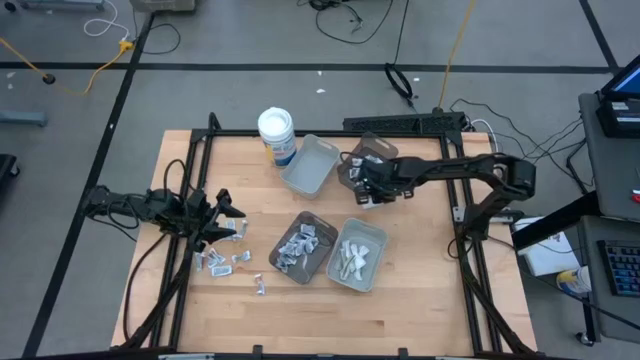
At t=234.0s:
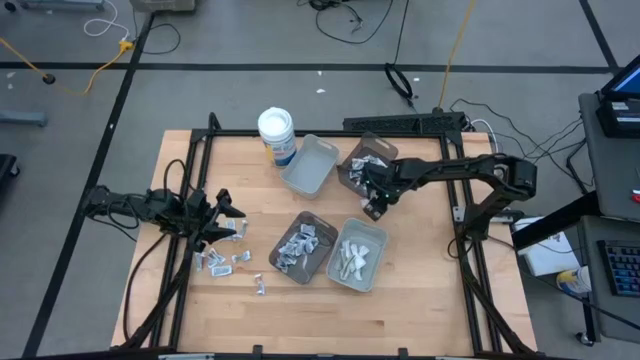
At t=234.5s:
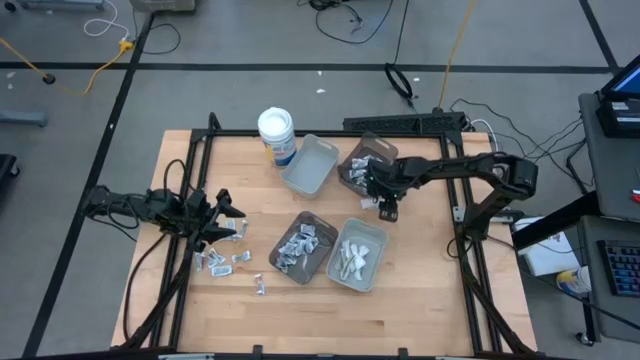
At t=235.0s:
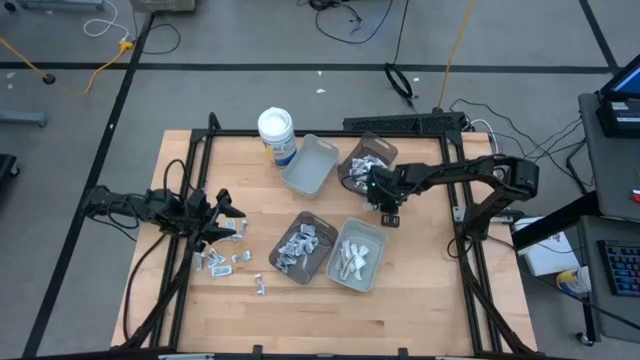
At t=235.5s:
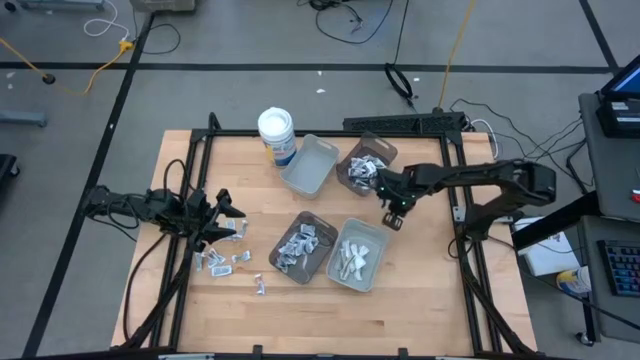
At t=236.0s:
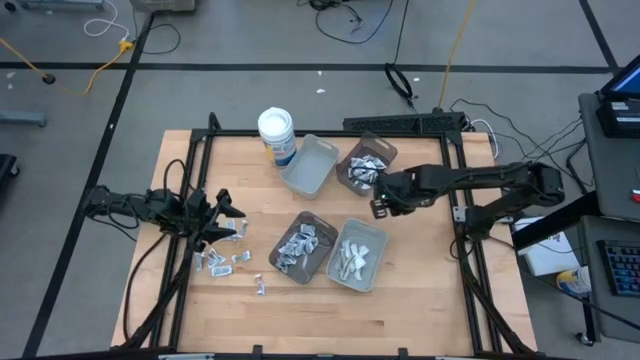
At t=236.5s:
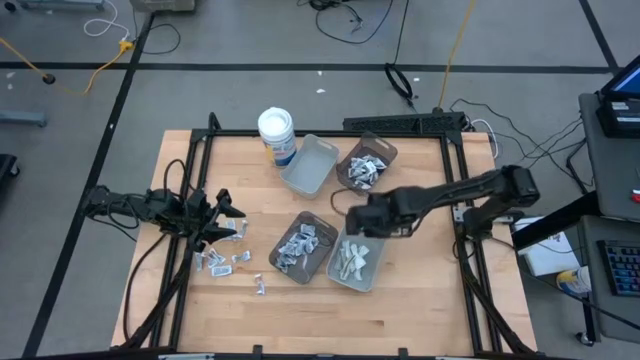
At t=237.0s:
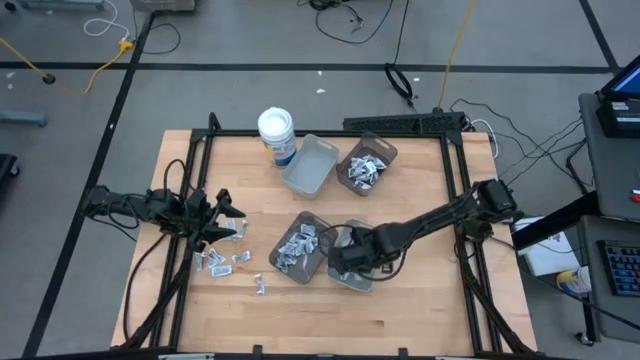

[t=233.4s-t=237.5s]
Task: Pick & Place First Aid Supplies
Put the green bandage into the bottom gray bin

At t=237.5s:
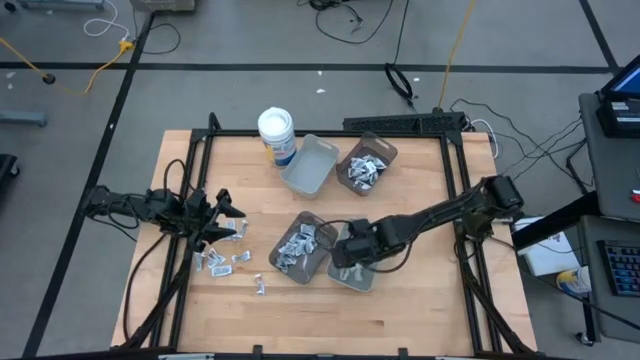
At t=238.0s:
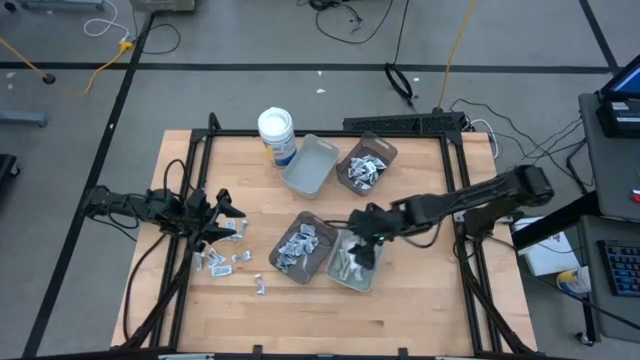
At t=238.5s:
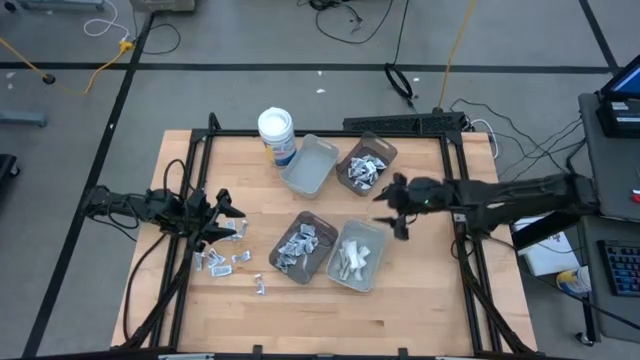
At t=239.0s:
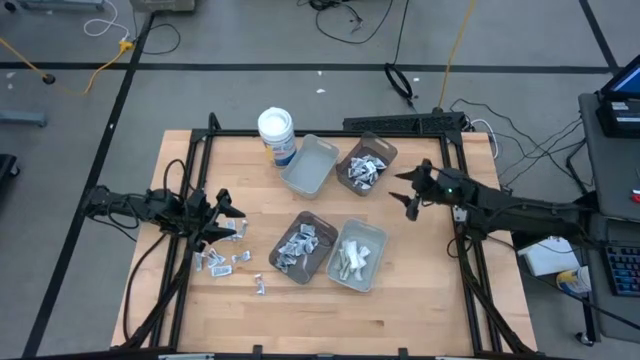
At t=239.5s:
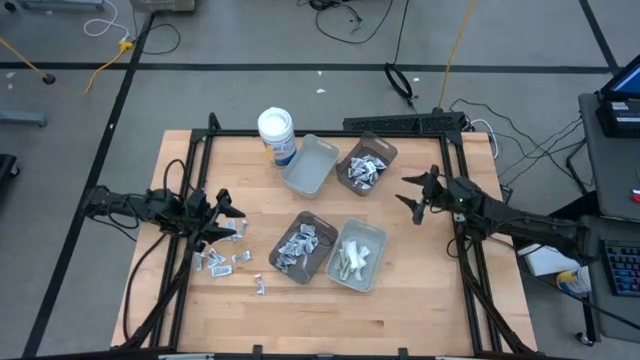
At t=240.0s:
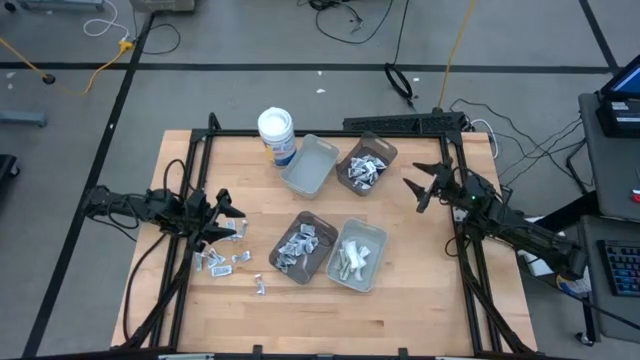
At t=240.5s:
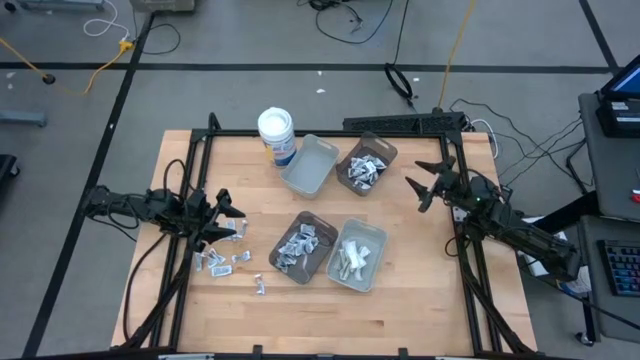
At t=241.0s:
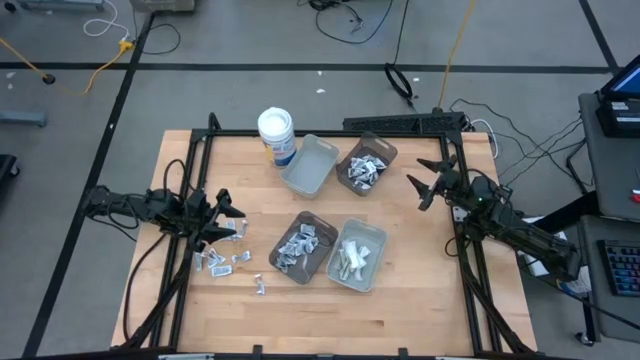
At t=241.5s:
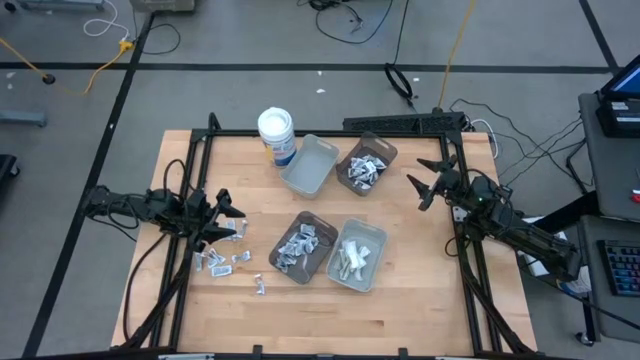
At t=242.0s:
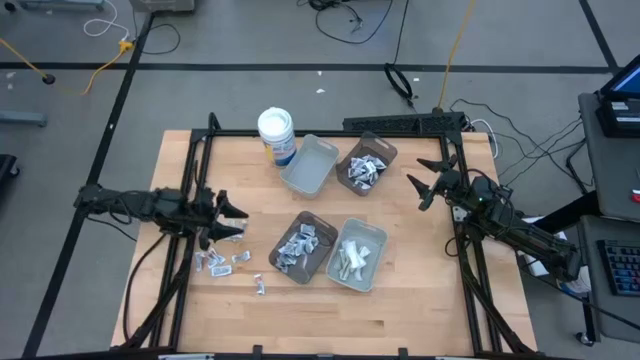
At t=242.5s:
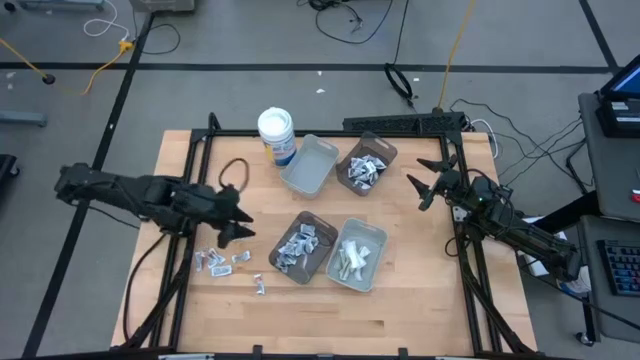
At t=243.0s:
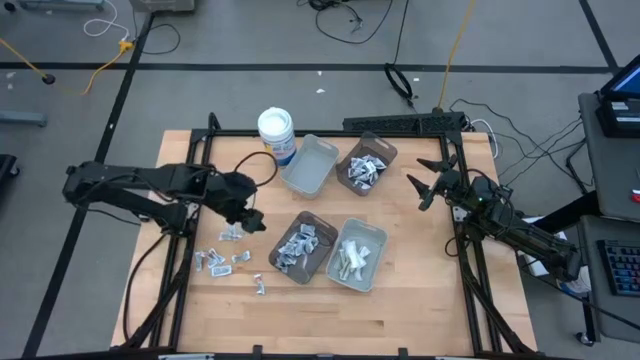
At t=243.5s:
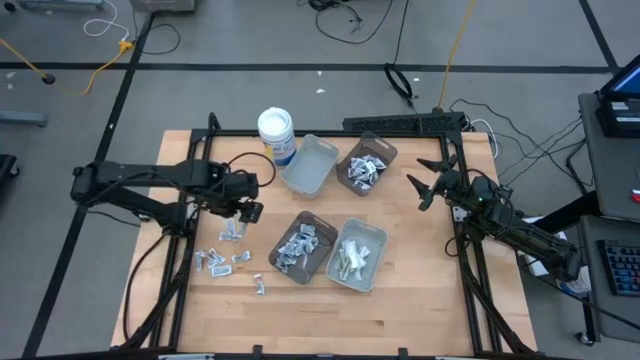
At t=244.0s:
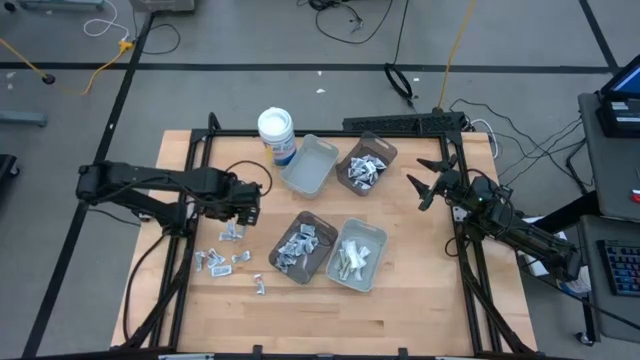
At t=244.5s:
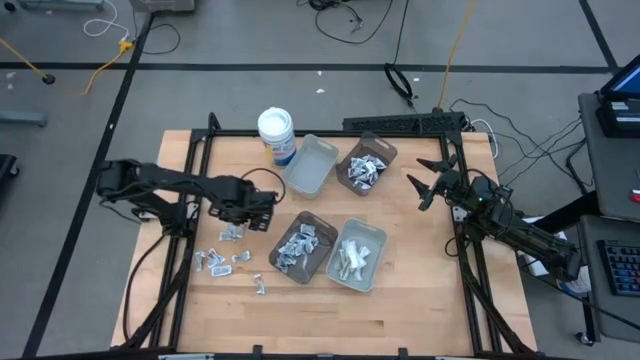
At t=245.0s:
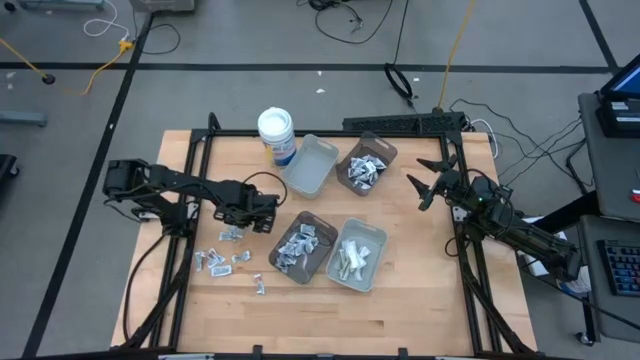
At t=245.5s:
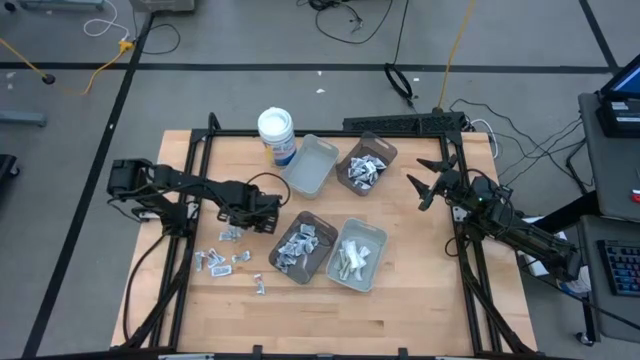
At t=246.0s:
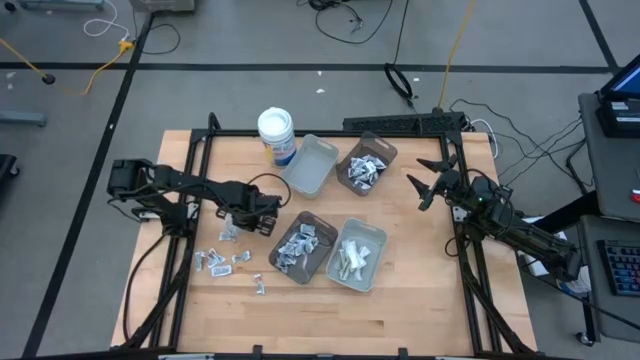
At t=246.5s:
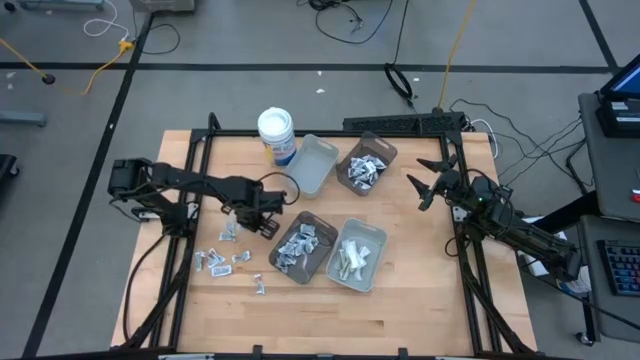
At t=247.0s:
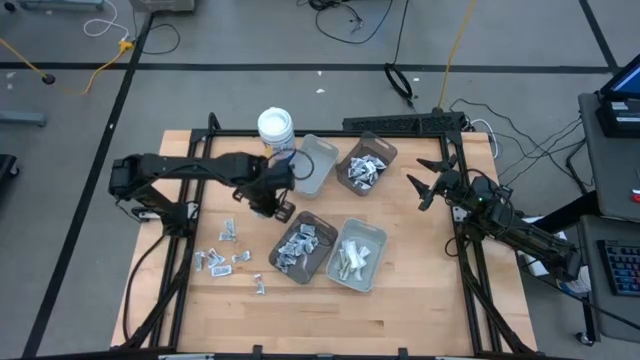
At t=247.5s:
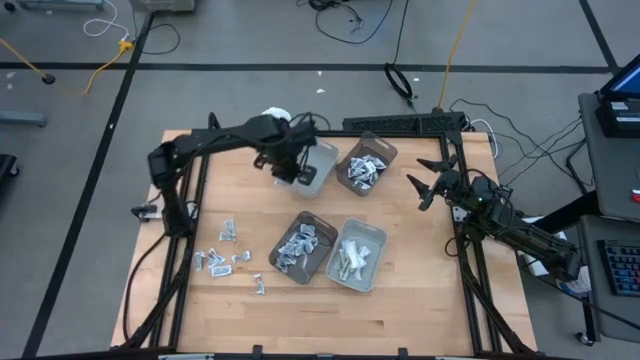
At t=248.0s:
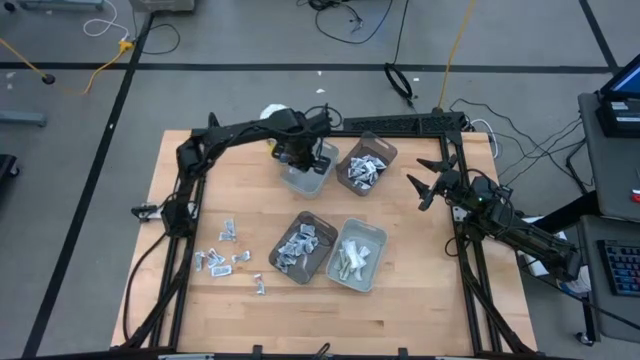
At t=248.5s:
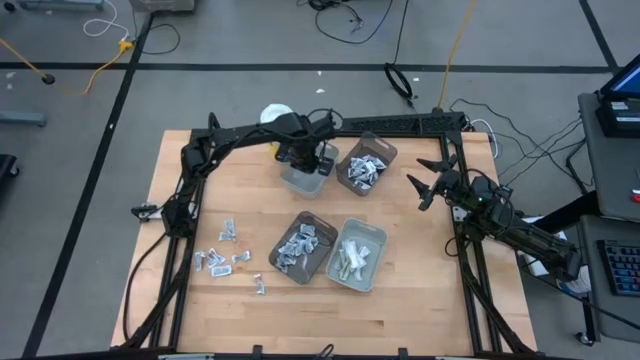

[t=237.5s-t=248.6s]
Put the orange ointment pack into the top gray bin

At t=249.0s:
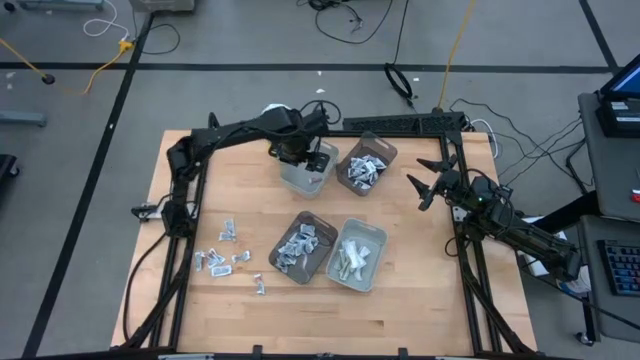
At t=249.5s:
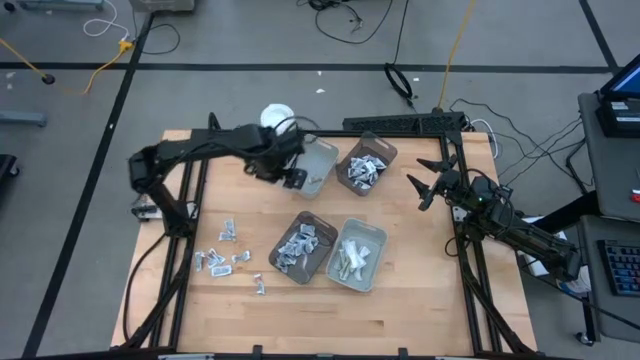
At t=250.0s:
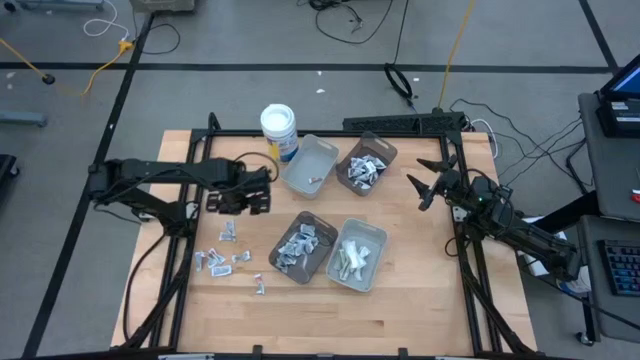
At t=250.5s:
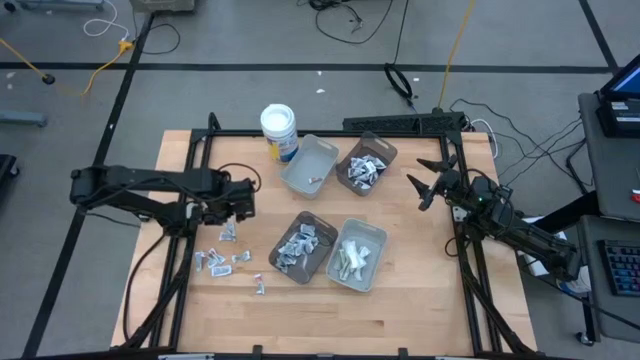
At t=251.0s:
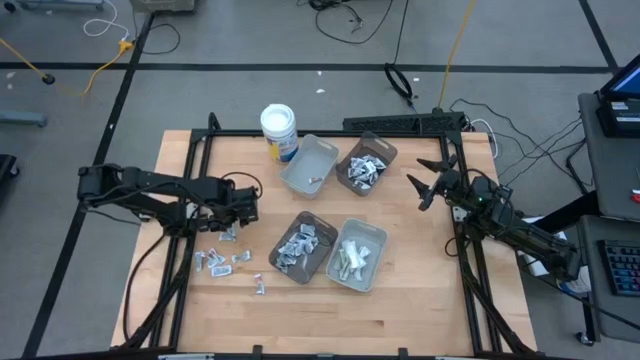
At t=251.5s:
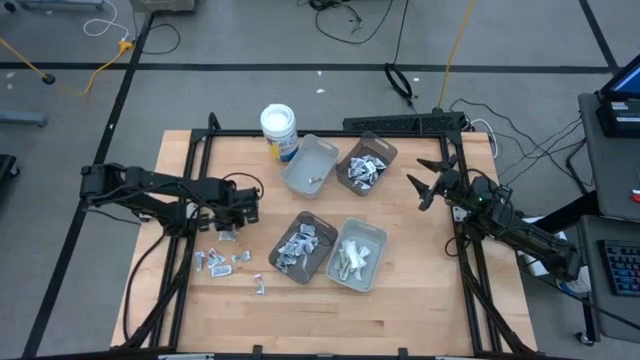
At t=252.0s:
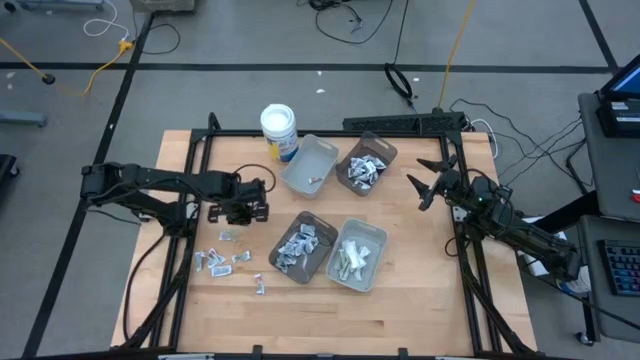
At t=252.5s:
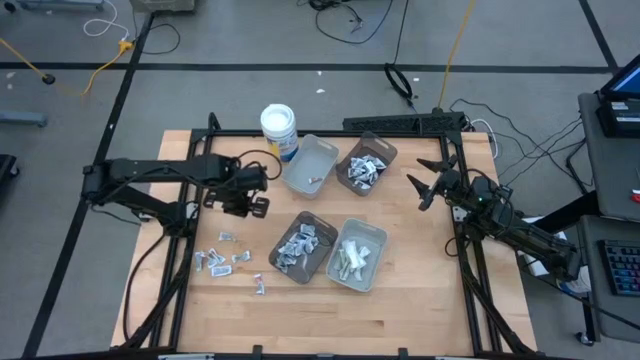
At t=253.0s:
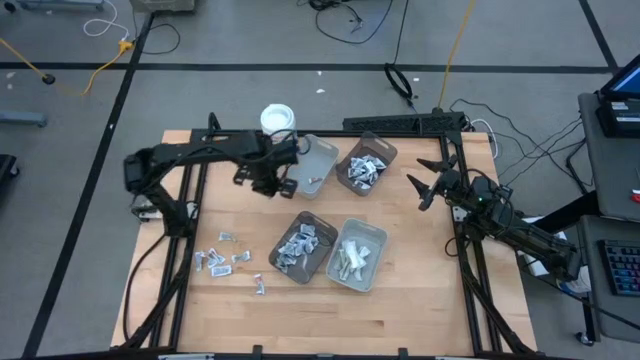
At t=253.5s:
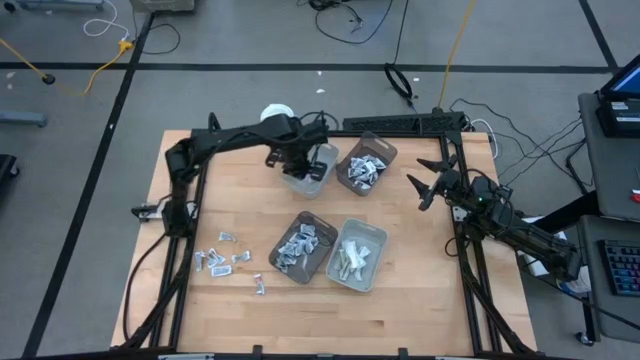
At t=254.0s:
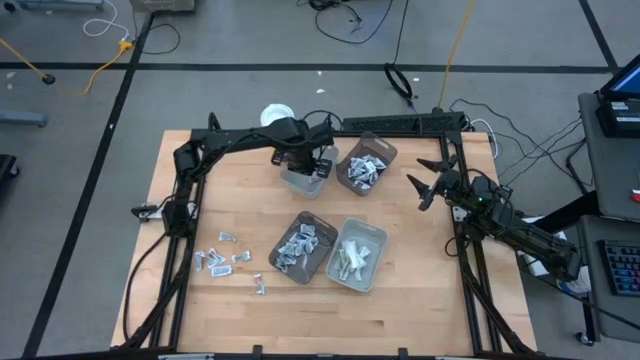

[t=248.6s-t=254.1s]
Put the orange ointment pack into the top gray bin
